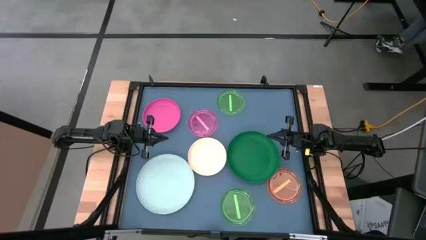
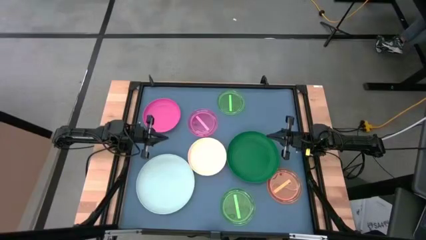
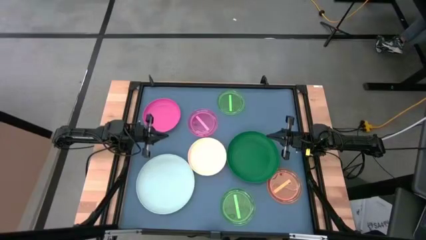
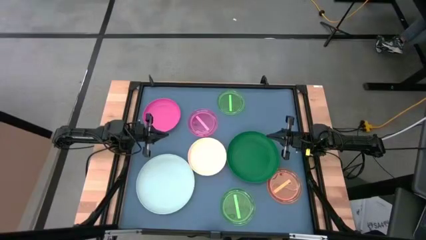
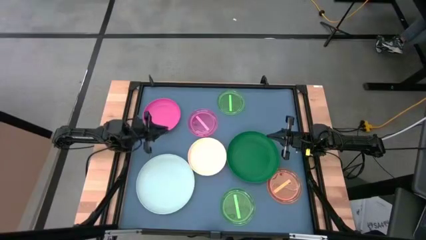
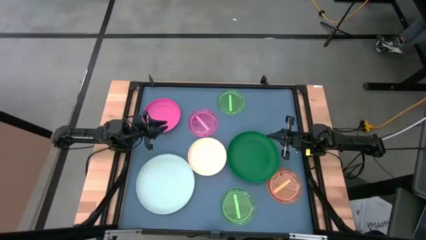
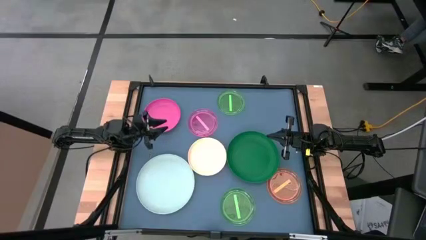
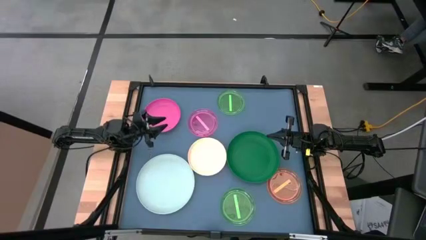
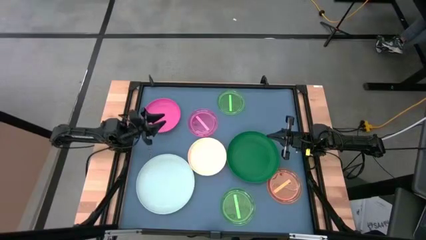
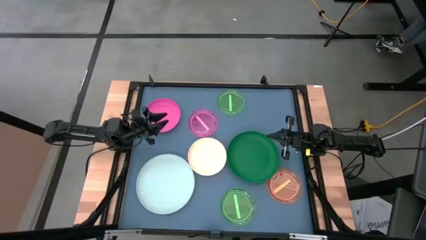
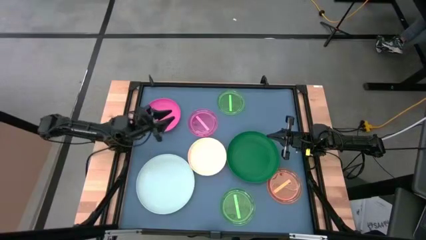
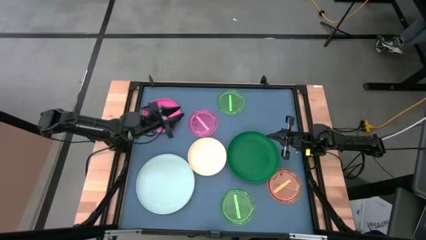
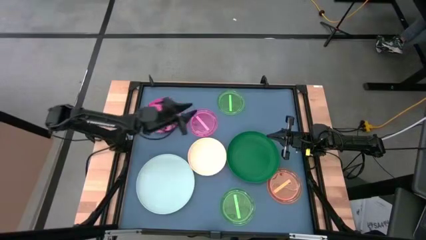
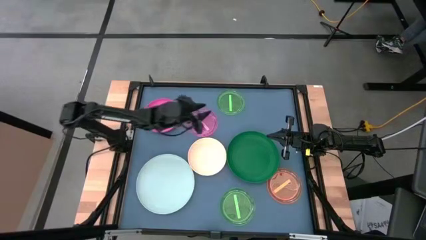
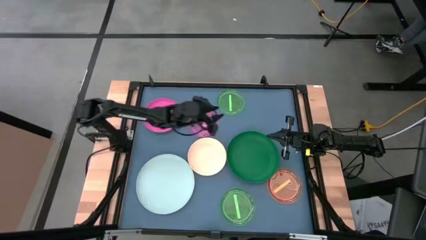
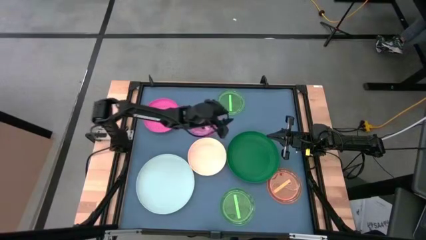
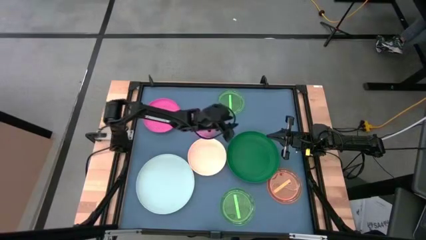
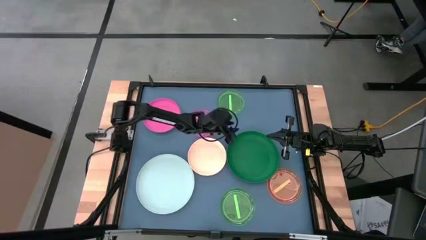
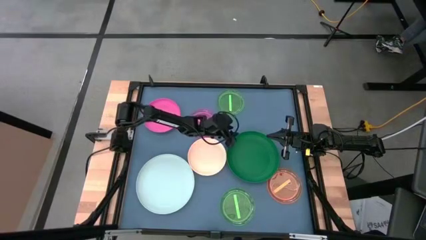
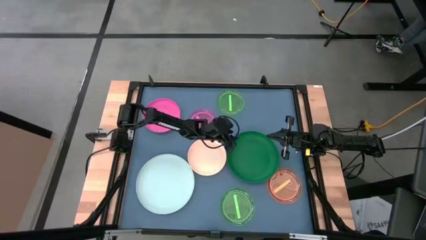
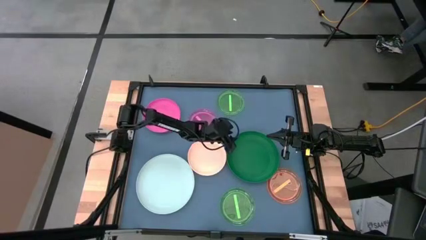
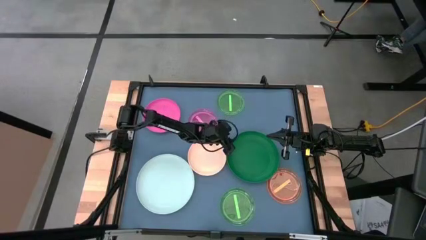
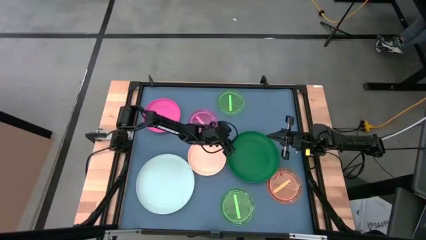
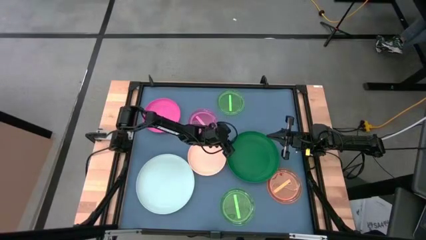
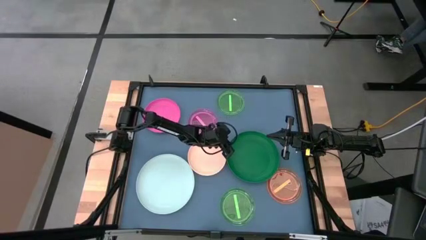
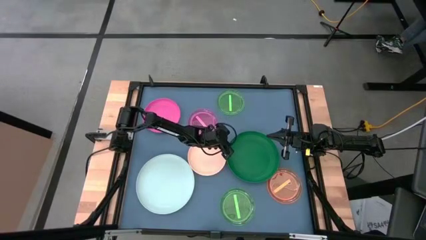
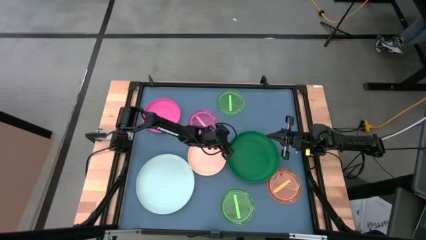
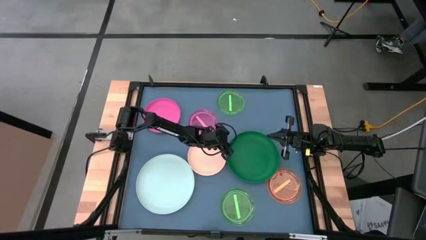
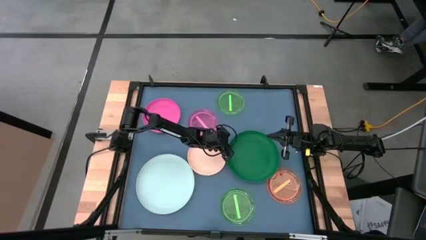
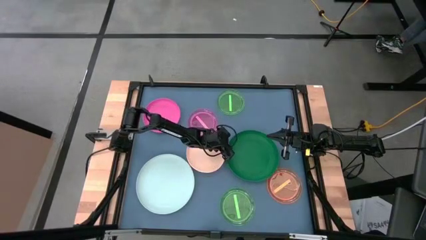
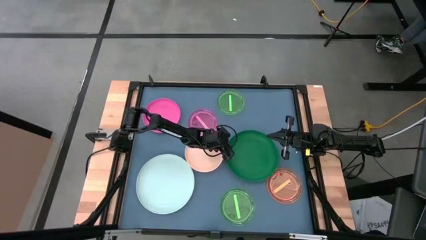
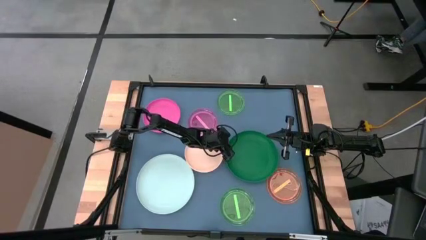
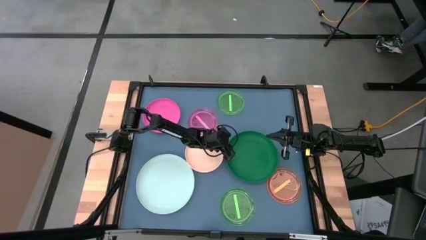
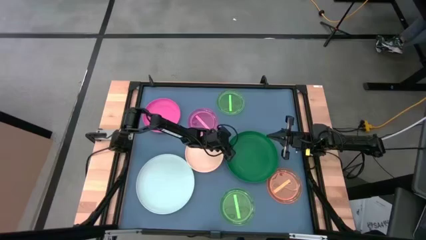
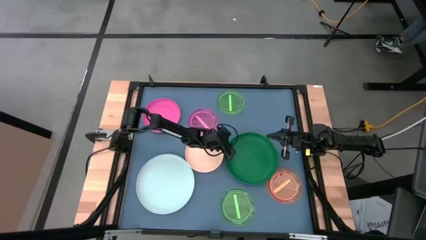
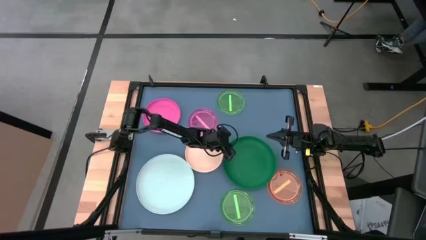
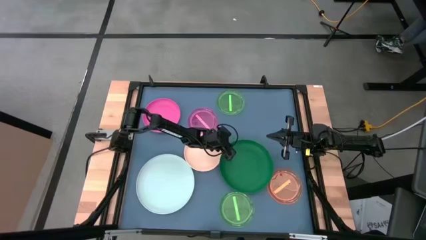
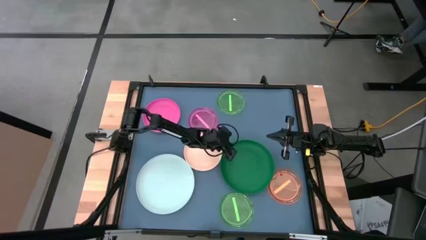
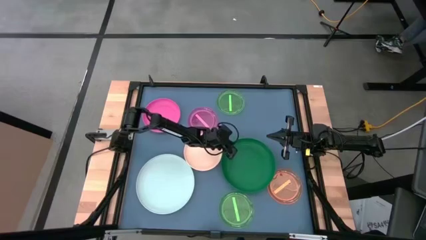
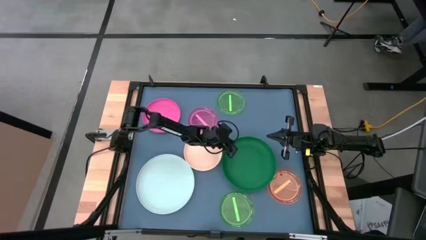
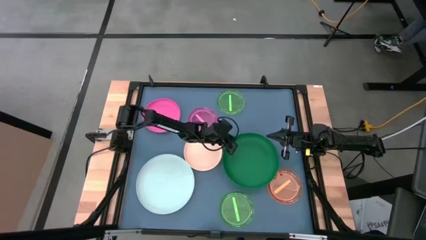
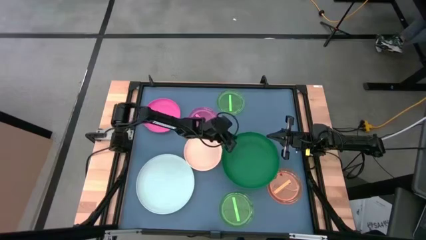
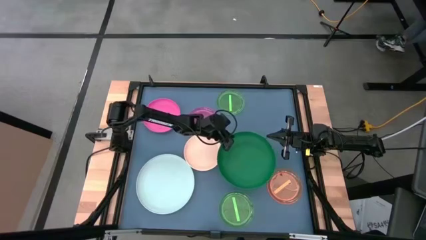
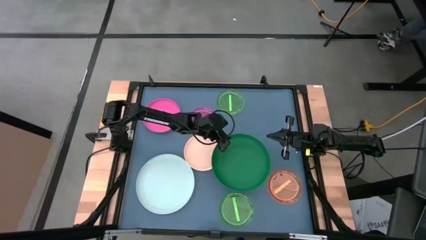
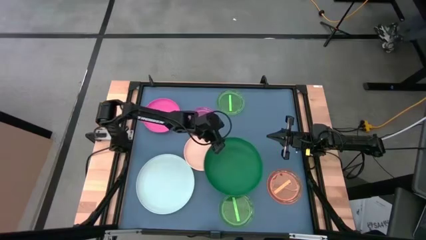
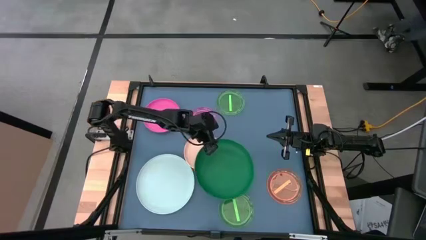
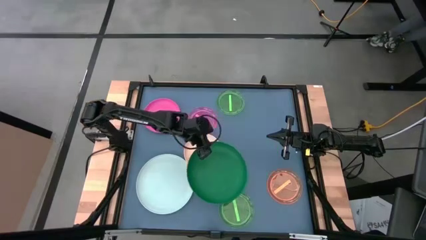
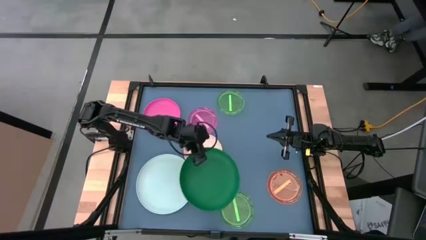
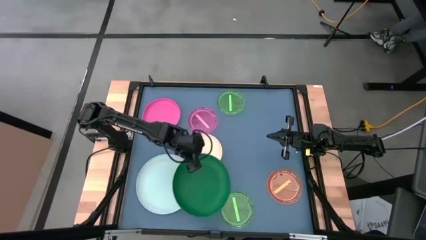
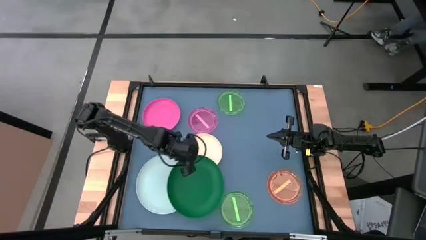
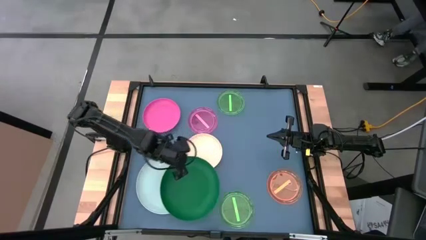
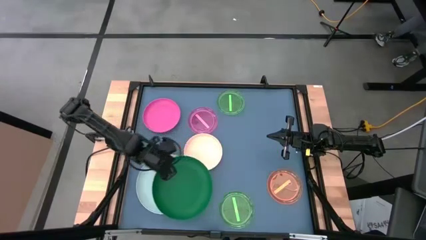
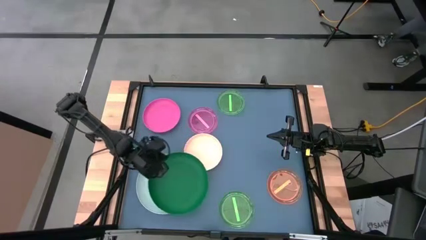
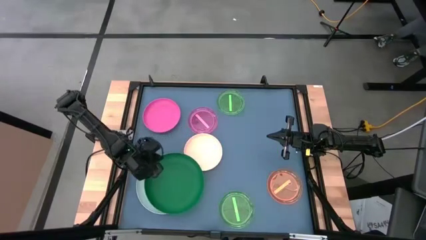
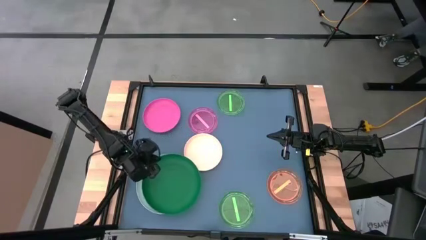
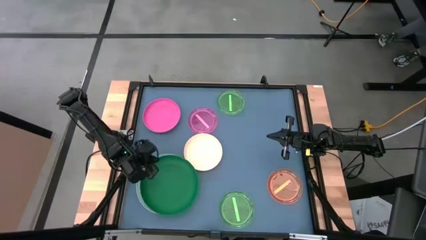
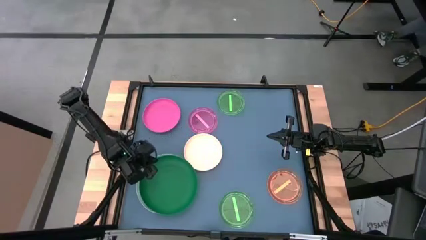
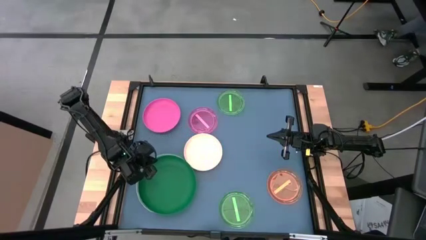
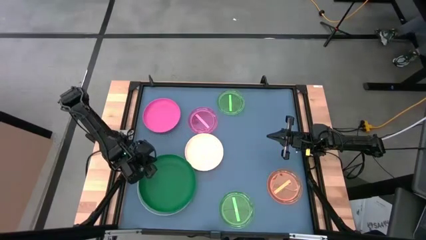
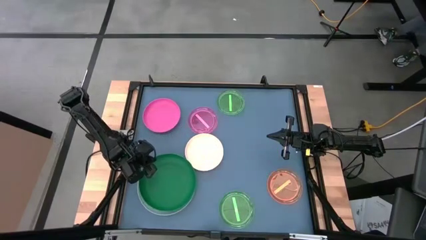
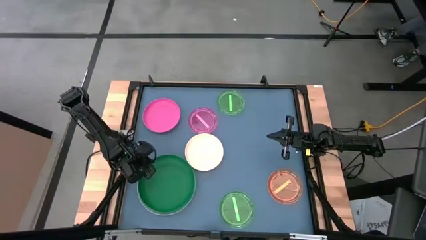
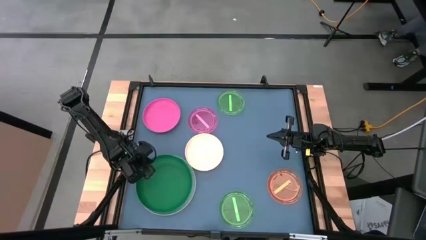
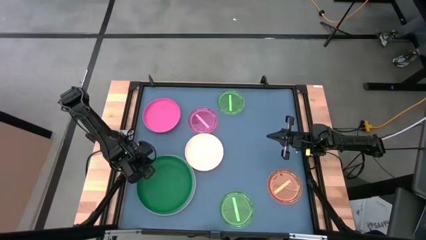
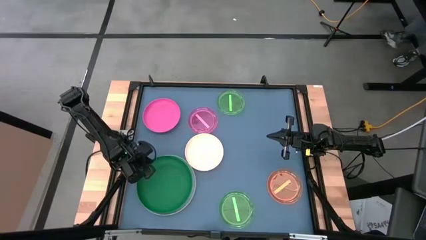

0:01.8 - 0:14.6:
Task: Stack plastic plates
Stack the dark green plate on top of blue plate
